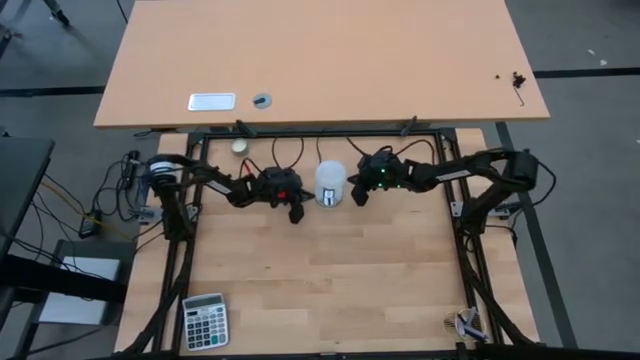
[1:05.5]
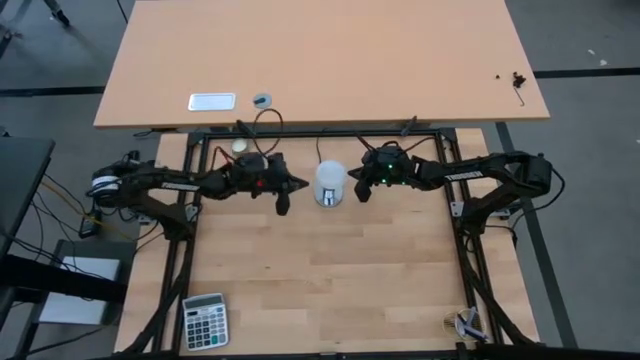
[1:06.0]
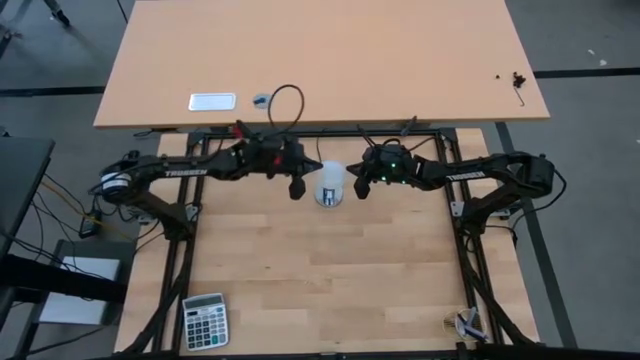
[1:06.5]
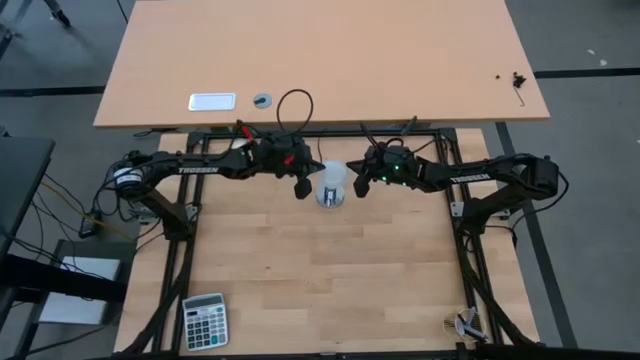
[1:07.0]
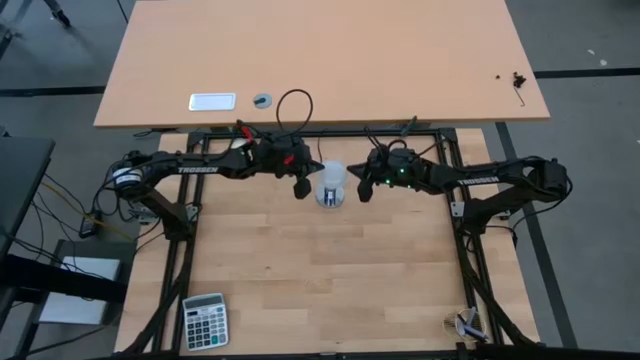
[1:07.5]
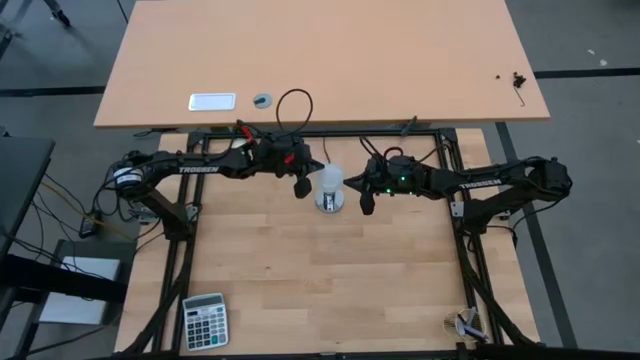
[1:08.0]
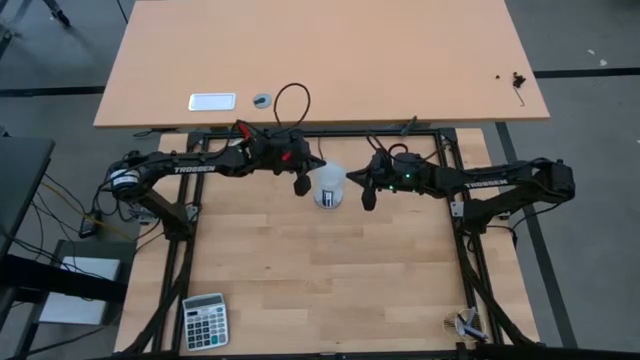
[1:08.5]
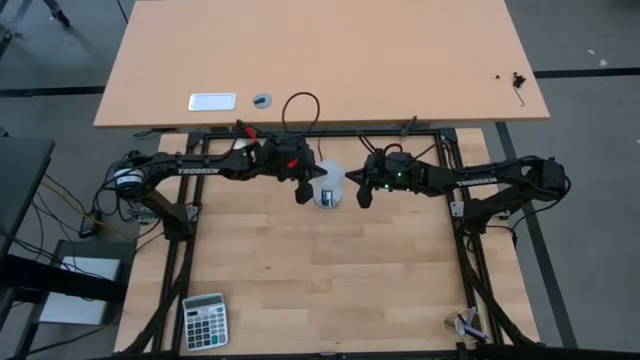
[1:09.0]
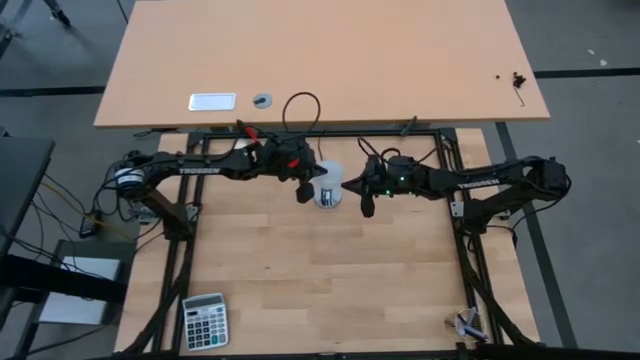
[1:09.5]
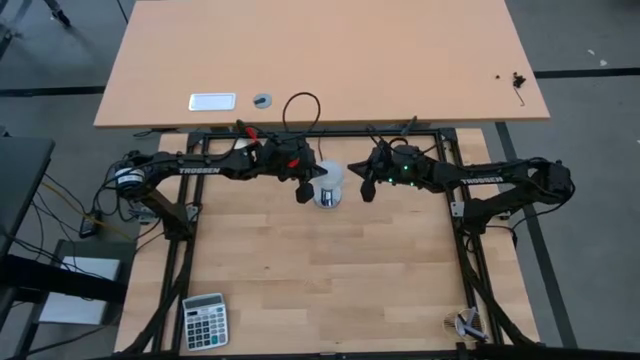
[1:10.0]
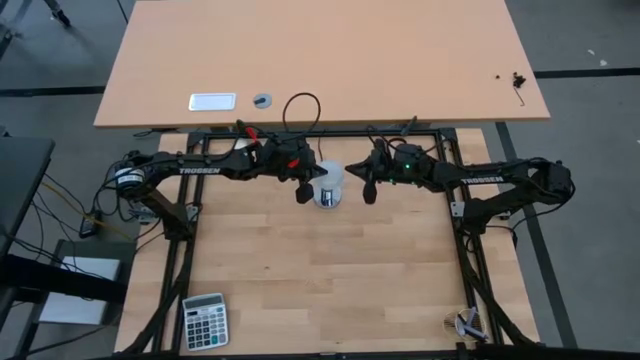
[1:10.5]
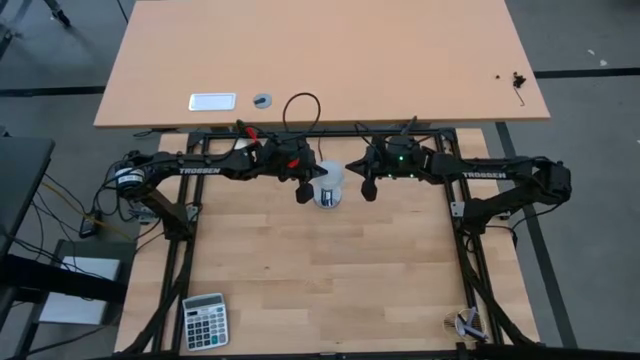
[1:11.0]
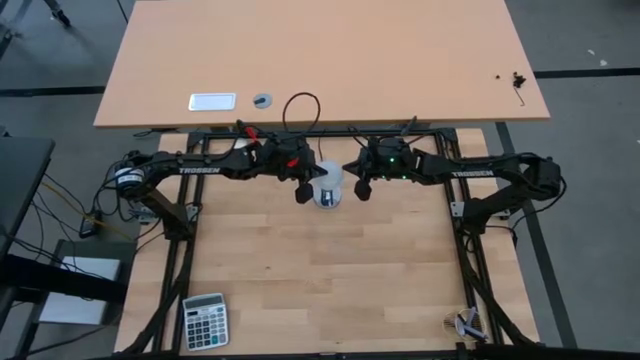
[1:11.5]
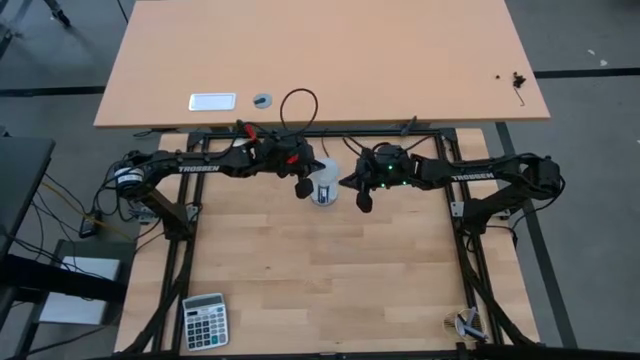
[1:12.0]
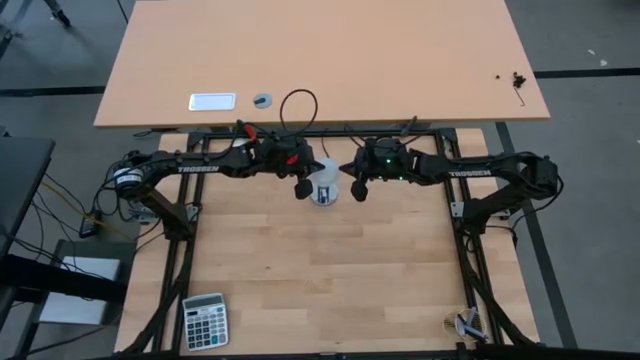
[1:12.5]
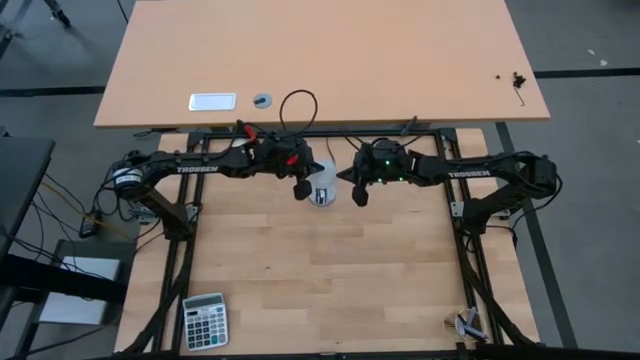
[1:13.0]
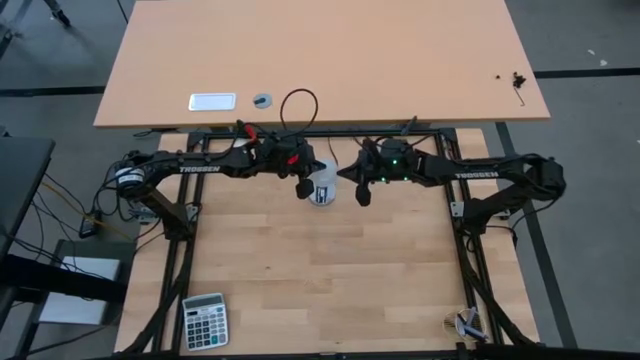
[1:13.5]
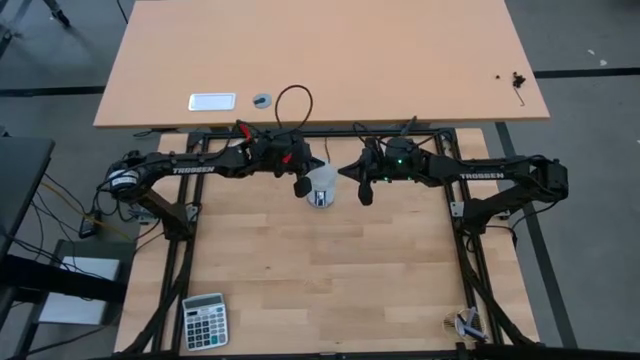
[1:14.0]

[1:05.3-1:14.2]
Task: Screw lightbulb
Insert the lightbulb into the lamp

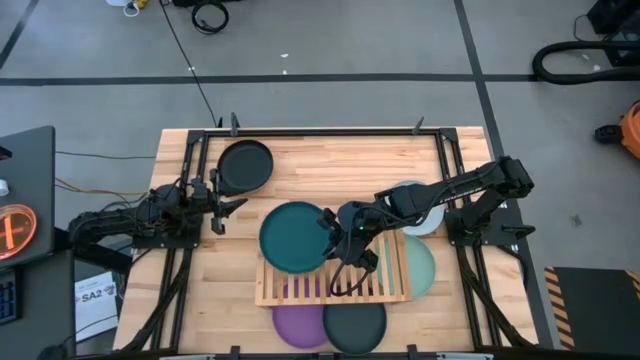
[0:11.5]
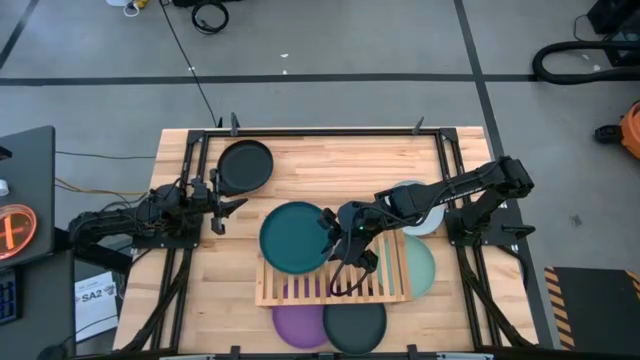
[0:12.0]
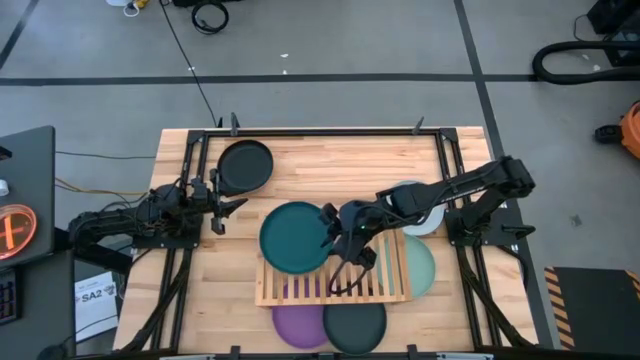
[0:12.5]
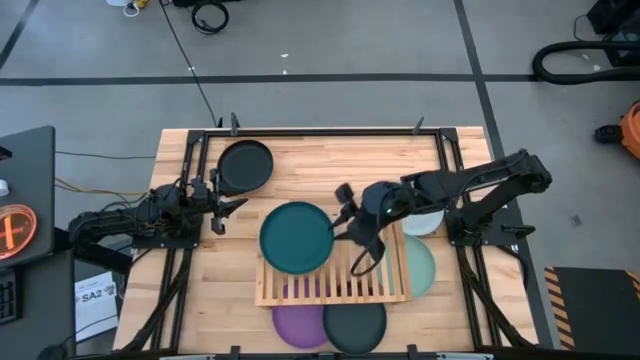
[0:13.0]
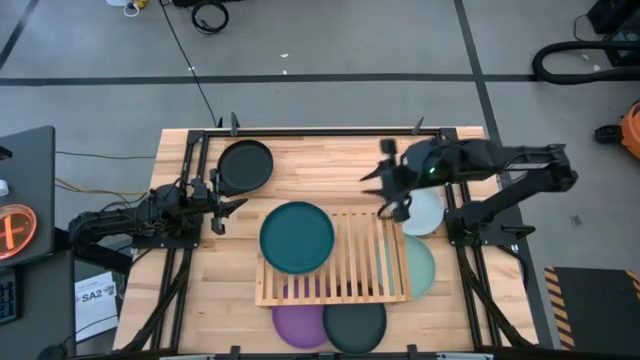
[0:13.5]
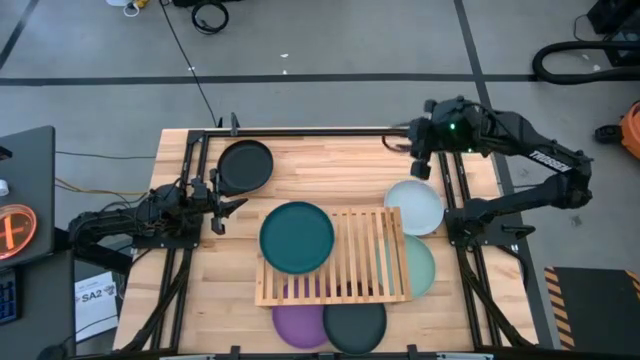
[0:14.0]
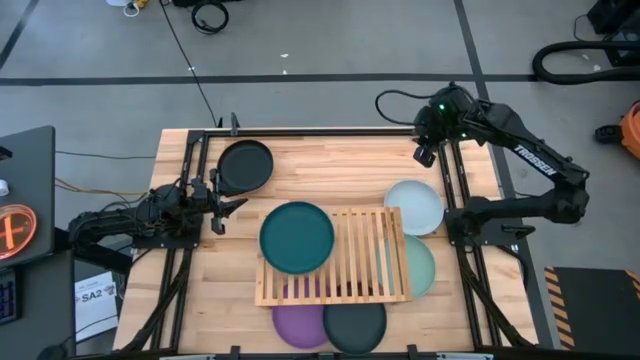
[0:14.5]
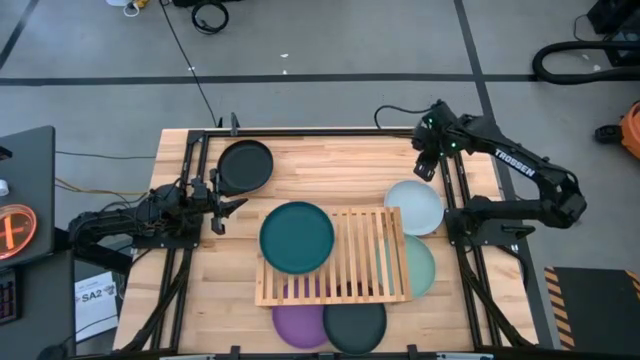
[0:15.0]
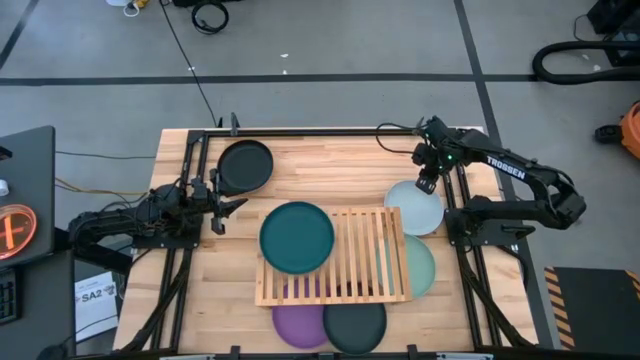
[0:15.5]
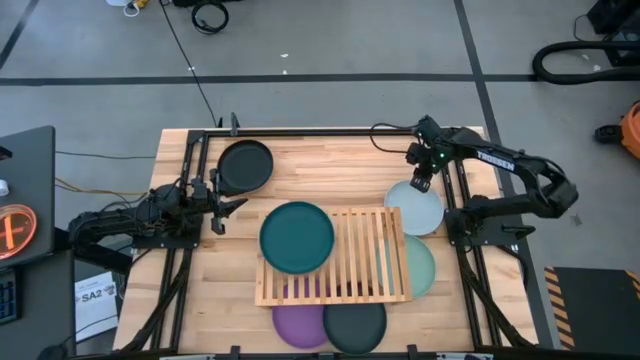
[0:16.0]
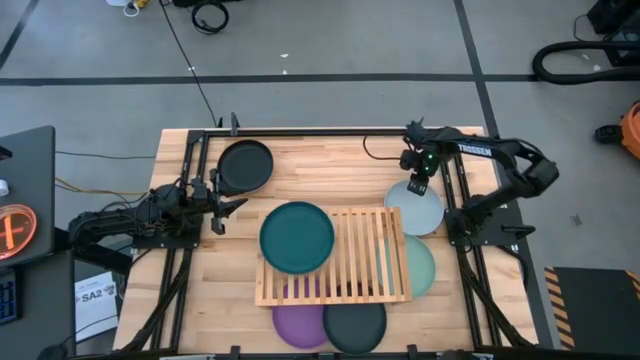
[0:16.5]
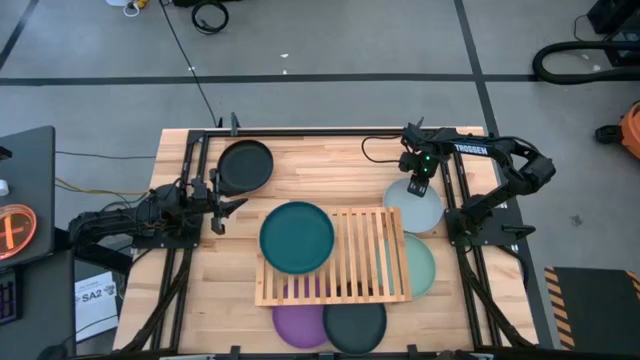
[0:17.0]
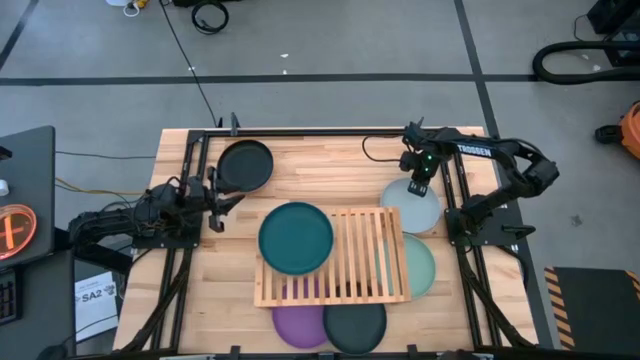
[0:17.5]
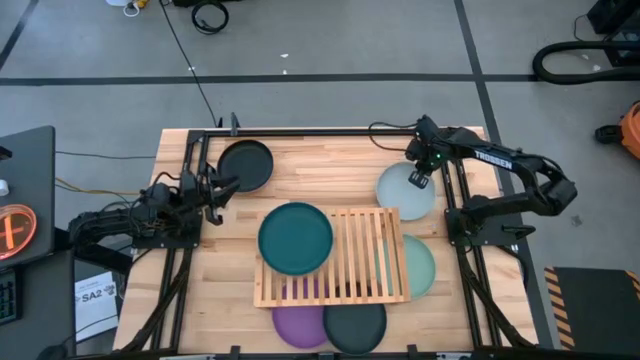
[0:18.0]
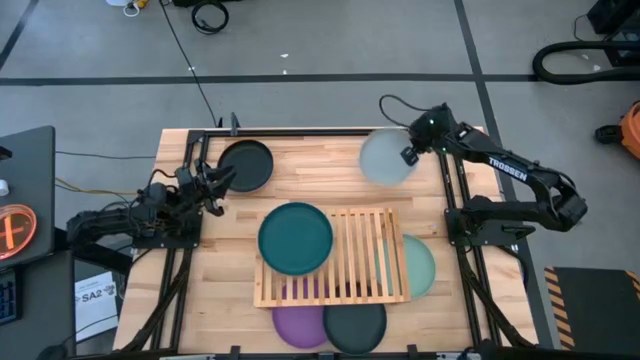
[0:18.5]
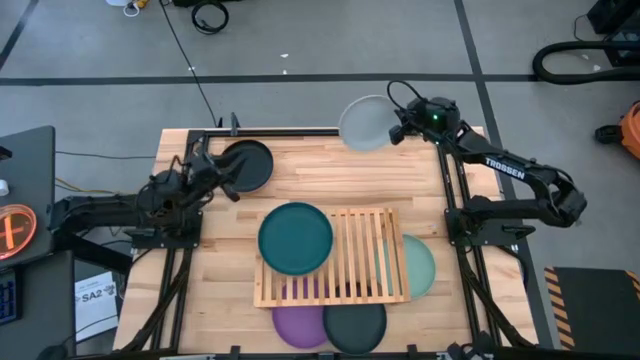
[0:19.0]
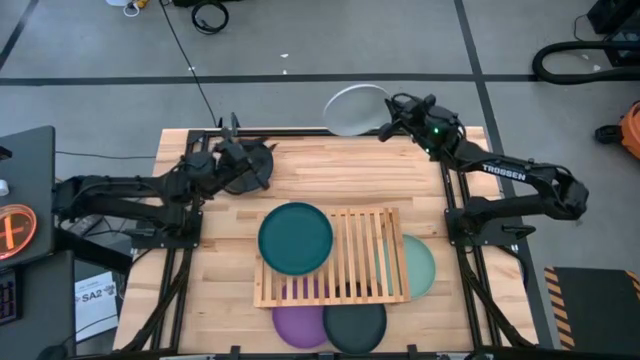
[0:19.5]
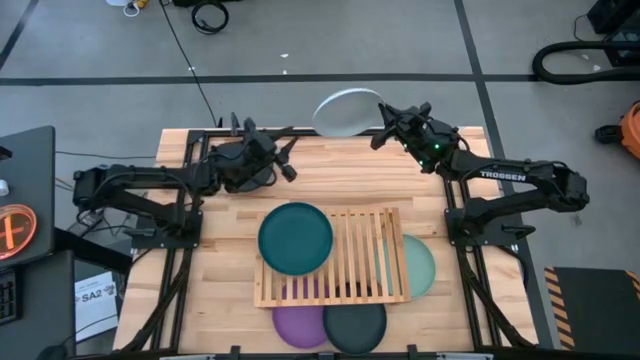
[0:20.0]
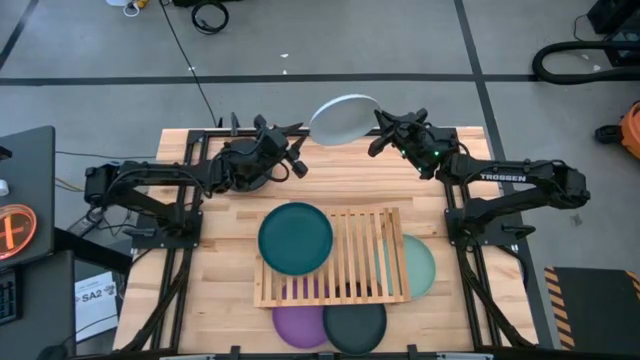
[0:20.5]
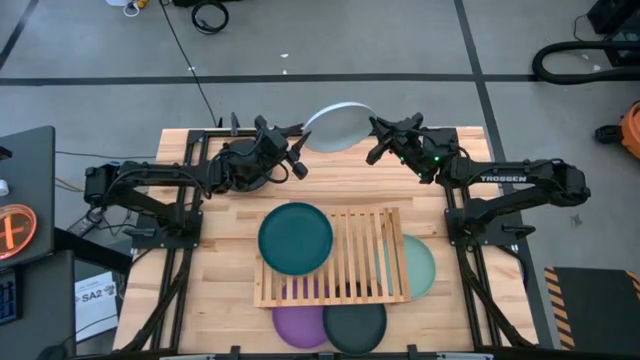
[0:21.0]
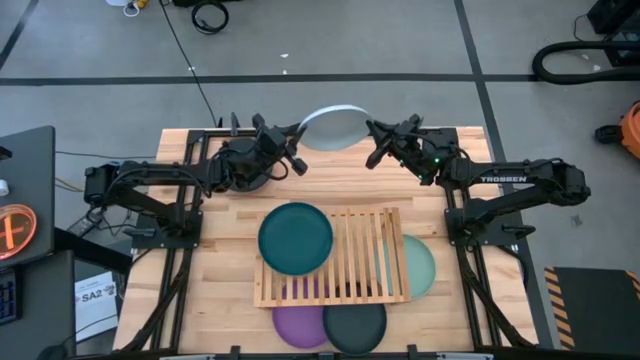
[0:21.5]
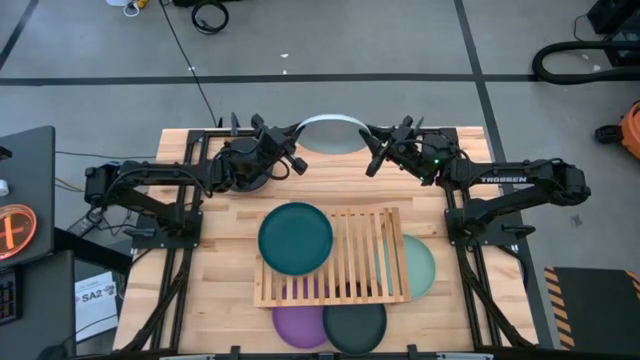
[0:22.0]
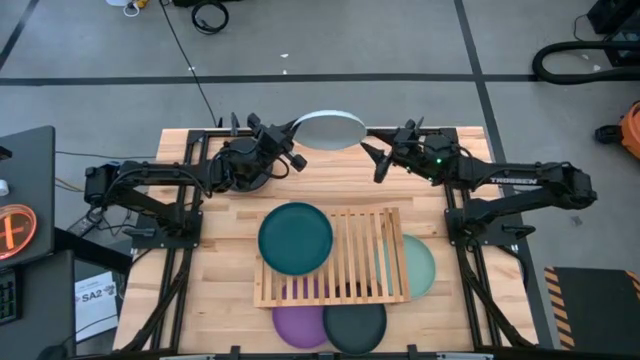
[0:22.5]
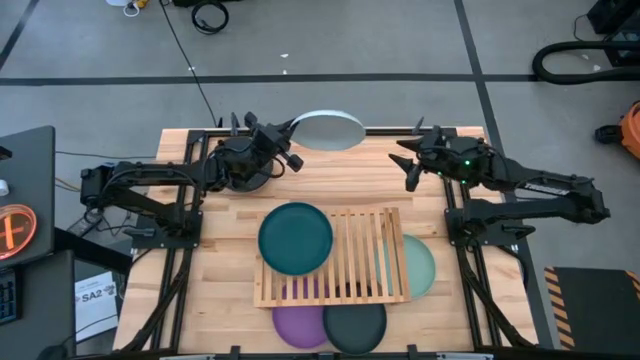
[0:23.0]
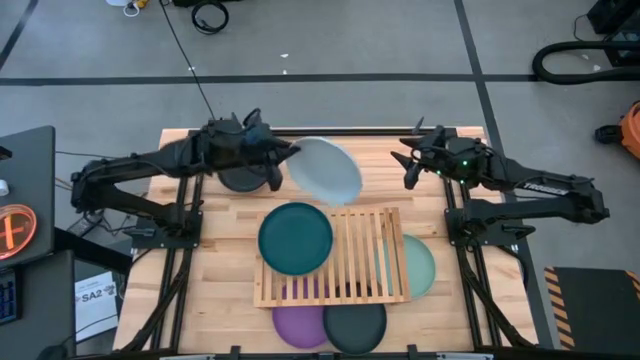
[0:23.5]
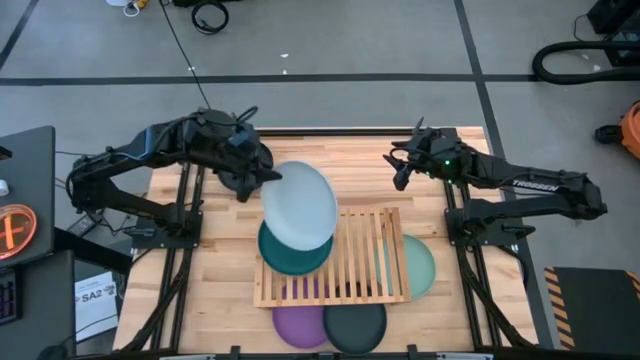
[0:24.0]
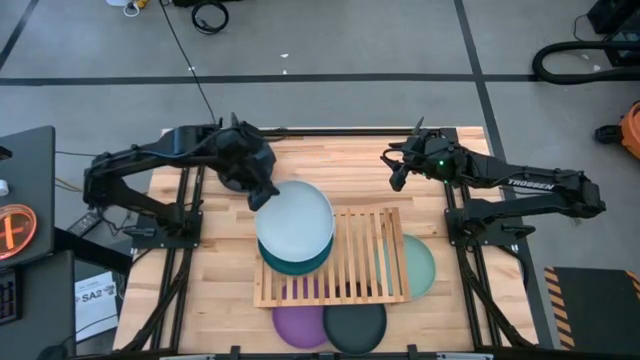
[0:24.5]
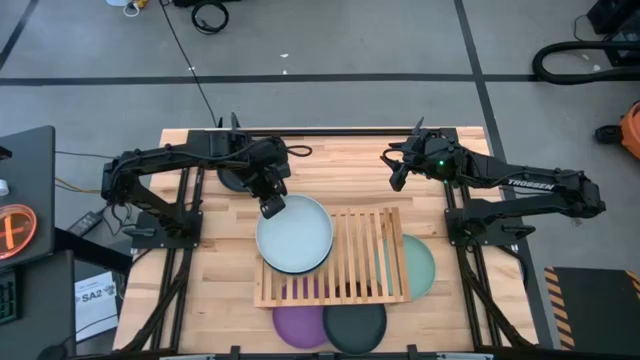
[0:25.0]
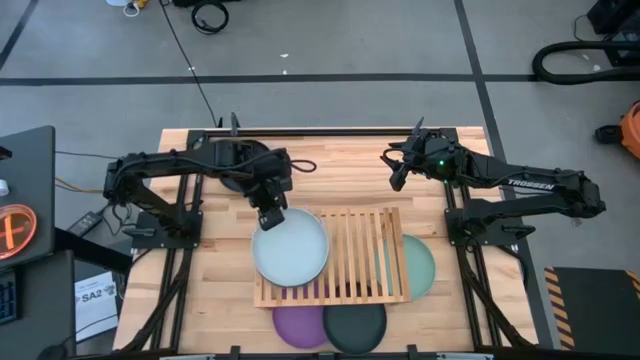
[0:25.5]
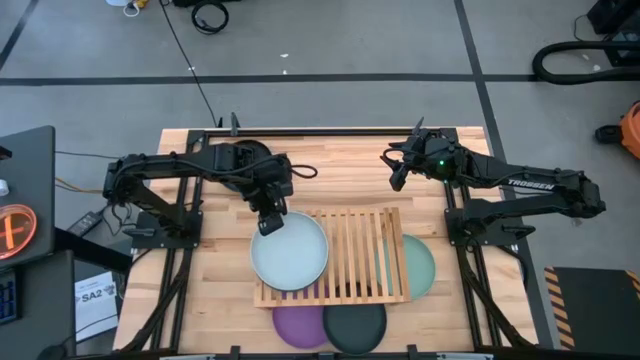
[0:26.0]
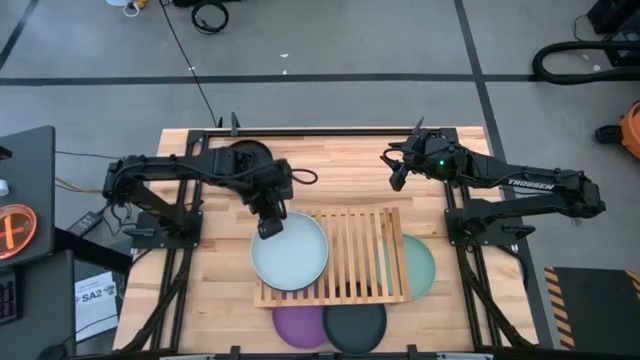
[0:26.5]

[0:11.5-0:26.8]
Task: Place and stack plates onto a shelf
Stack the gray plate on top of the dark green plate on the shelf
